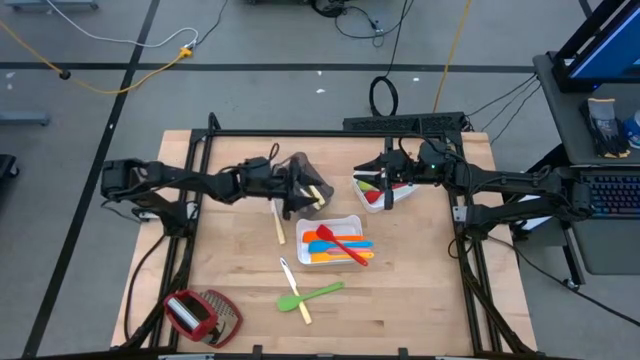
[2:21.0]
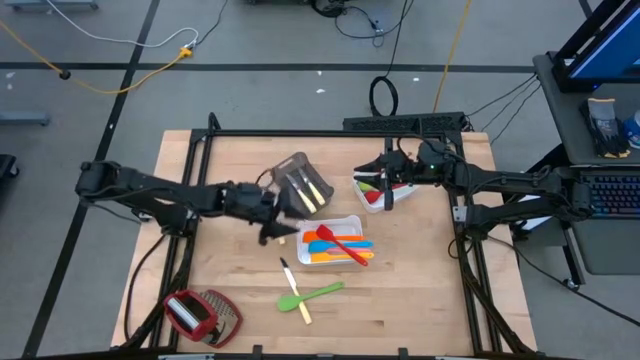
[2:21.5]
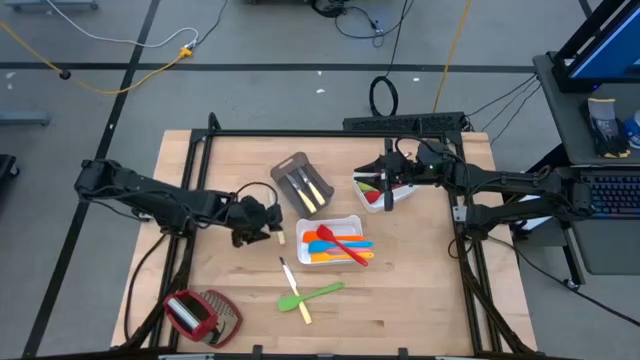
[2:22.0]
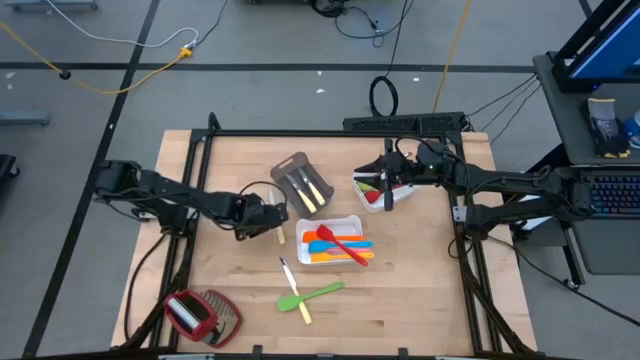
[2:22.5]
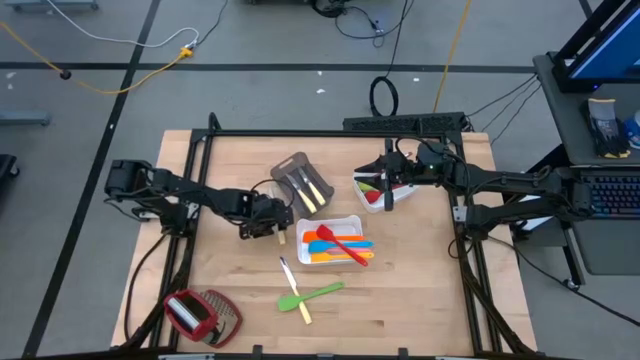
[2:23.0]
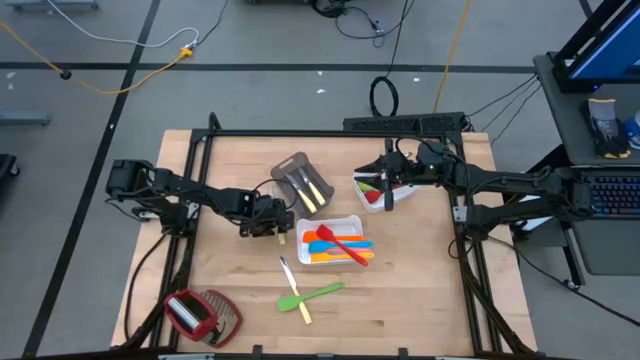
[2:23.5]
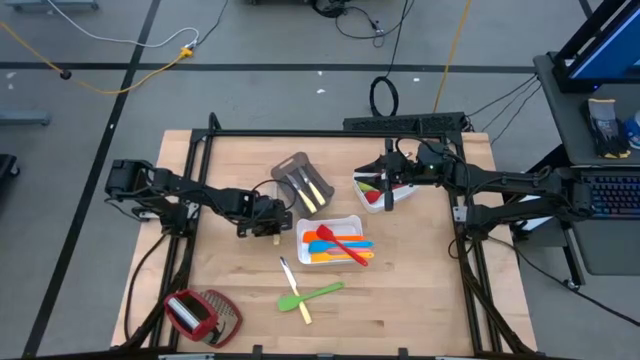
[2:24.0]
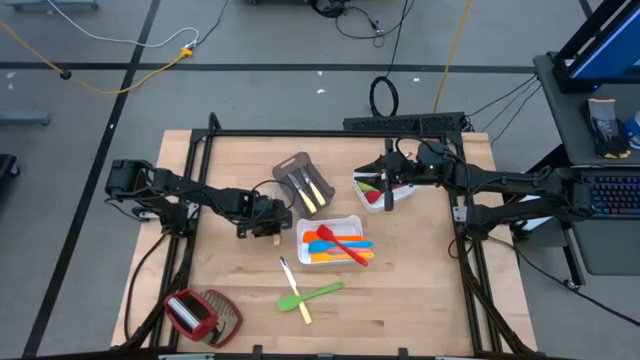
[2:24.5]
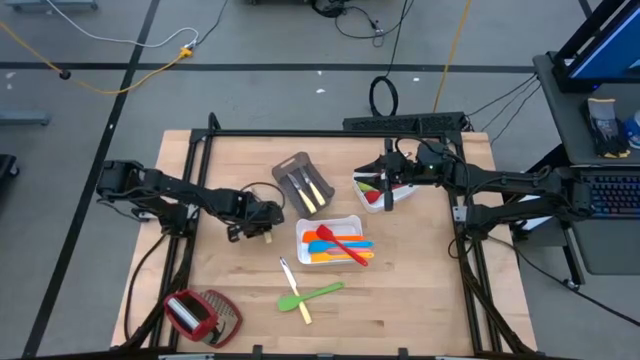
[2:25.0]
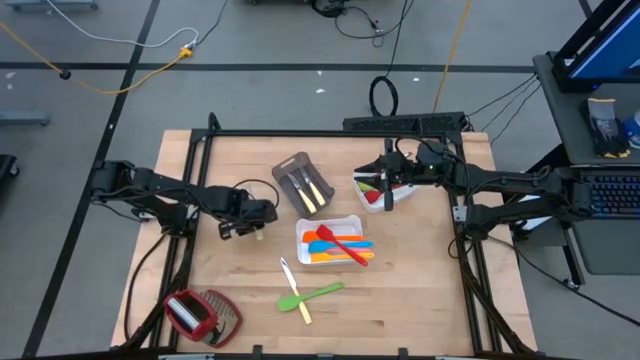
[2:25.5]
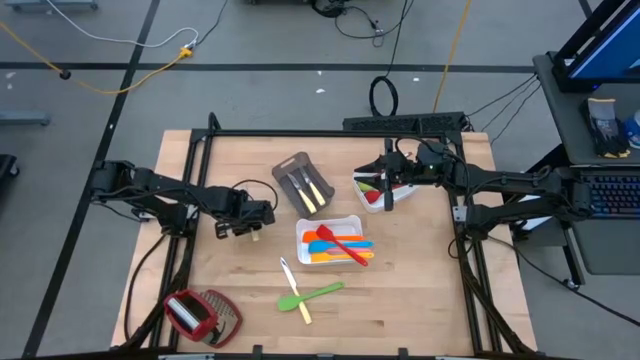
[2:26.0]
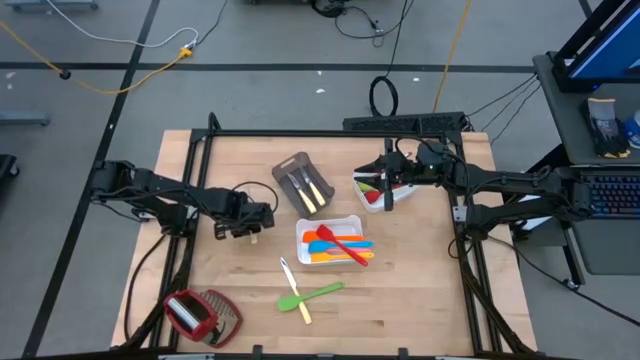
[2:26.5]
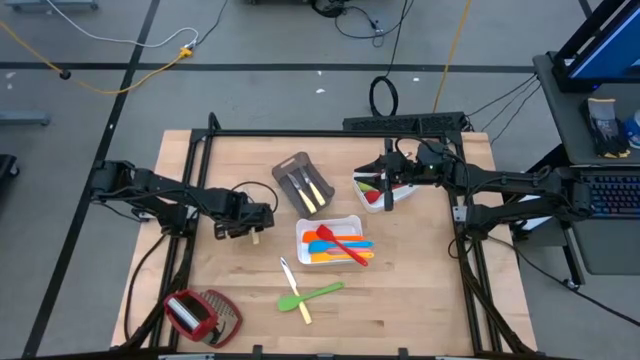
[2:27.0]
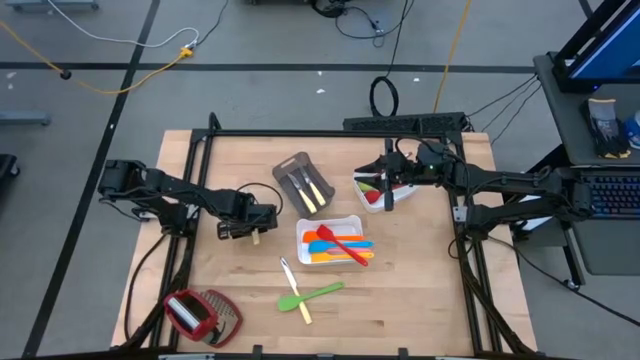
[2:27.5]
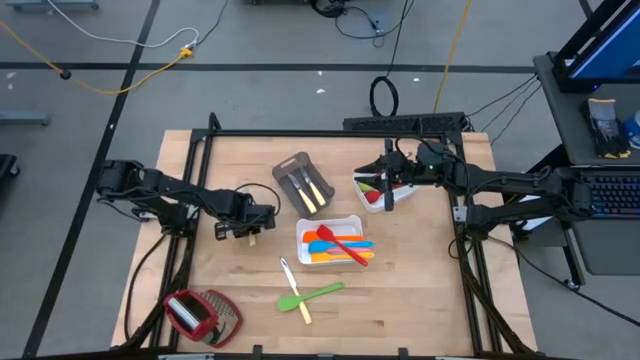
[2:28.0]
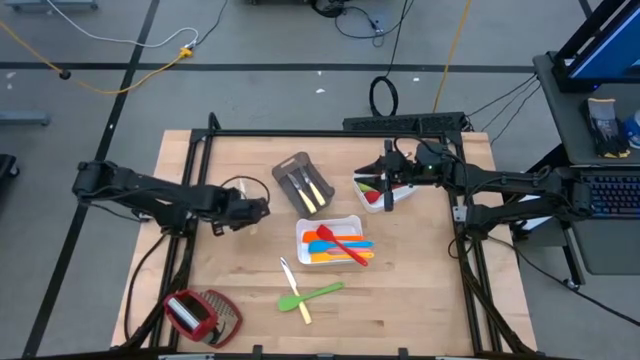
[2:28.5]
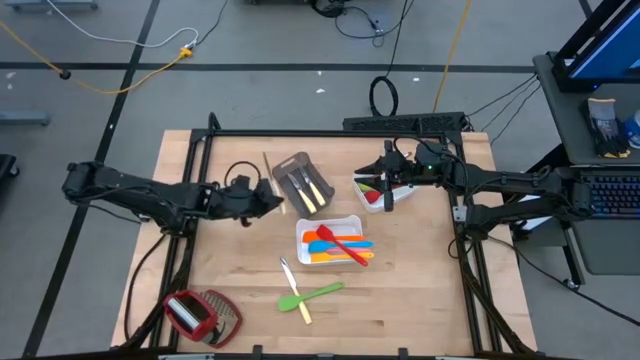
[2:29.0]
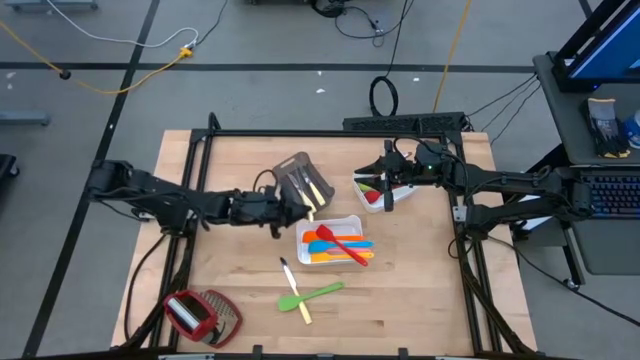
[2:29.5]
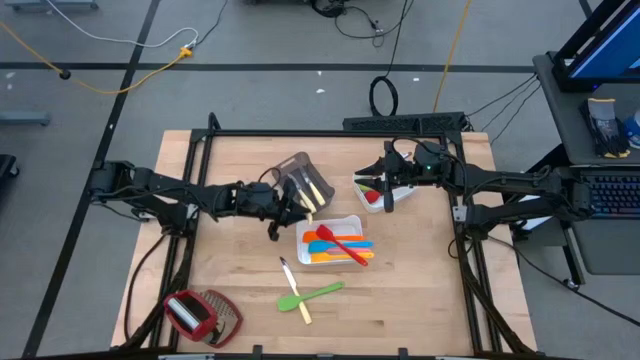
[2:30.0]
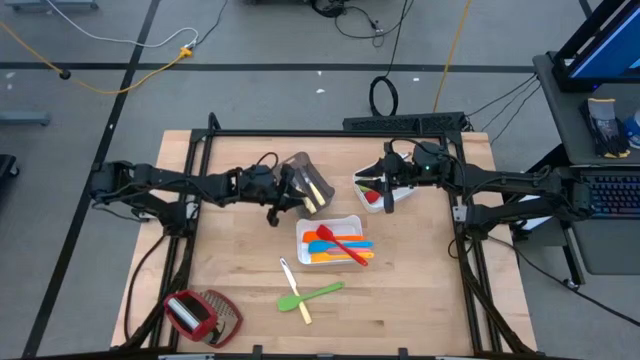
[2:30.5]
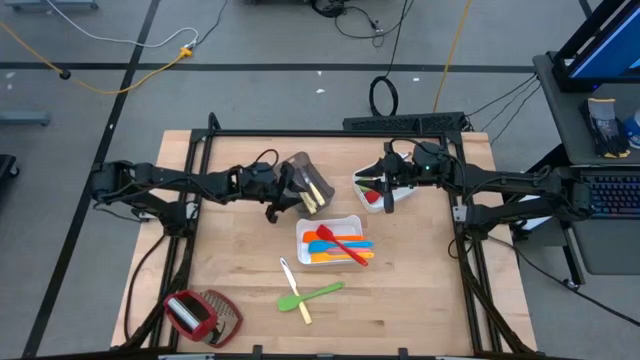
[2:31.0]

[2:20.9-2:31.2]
Task: Pick & Place Kitchen Items
Put the yellow knife into the black bin

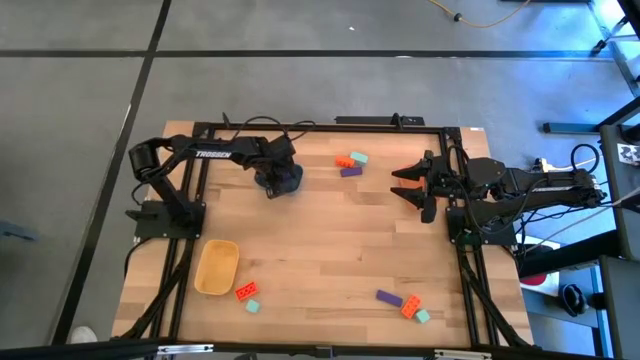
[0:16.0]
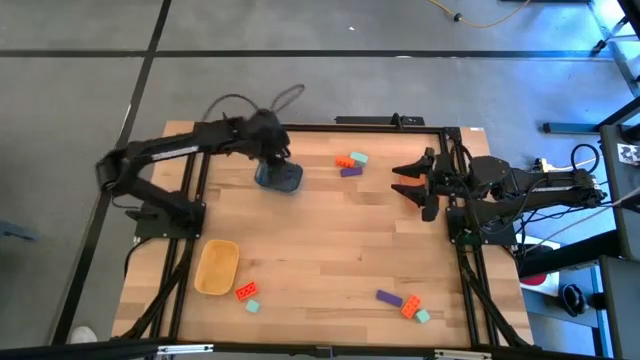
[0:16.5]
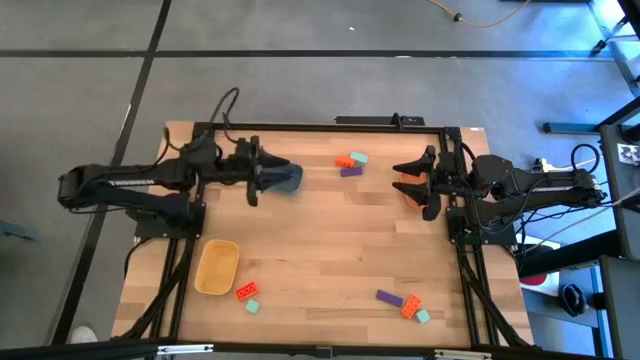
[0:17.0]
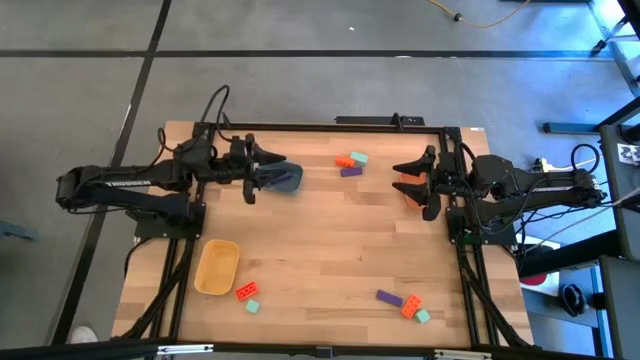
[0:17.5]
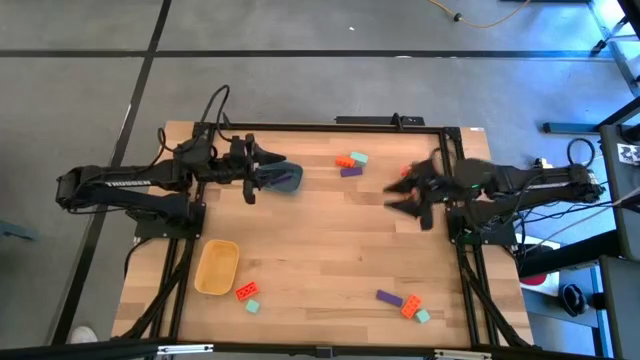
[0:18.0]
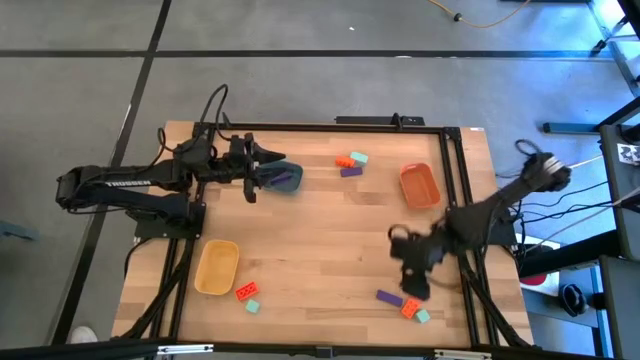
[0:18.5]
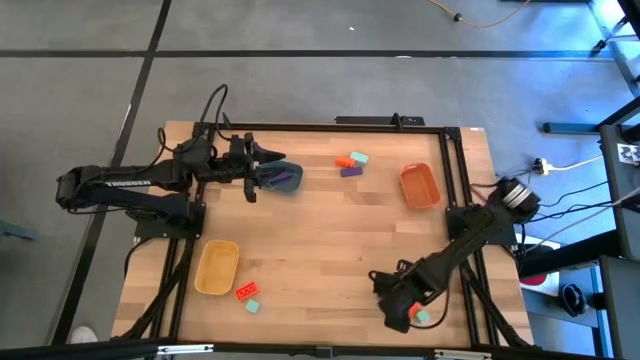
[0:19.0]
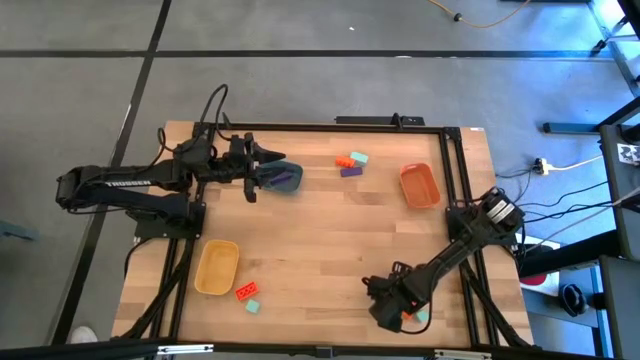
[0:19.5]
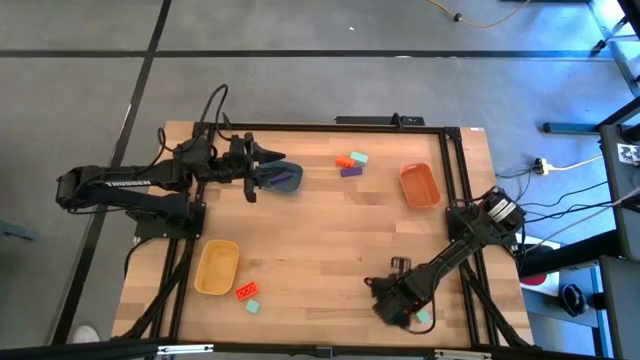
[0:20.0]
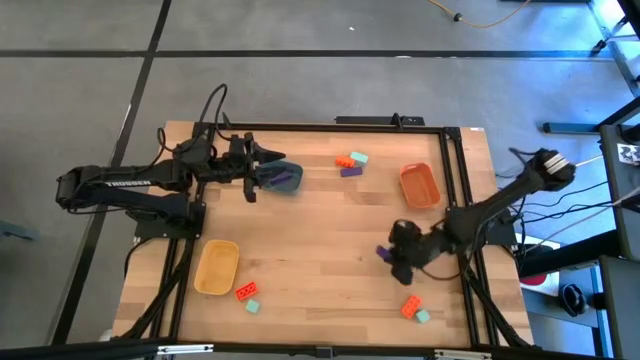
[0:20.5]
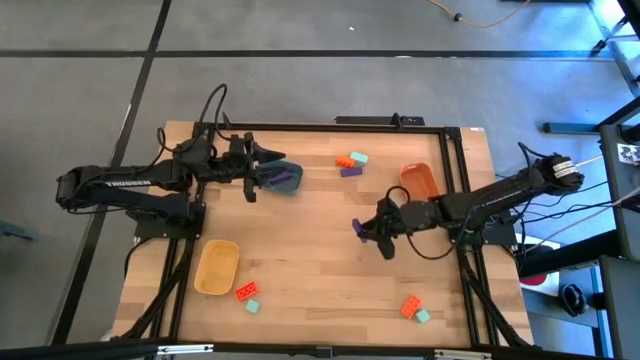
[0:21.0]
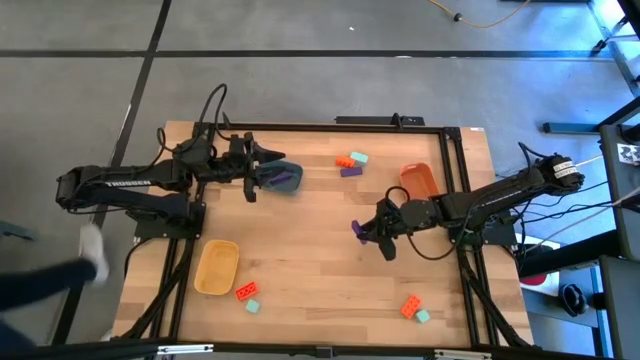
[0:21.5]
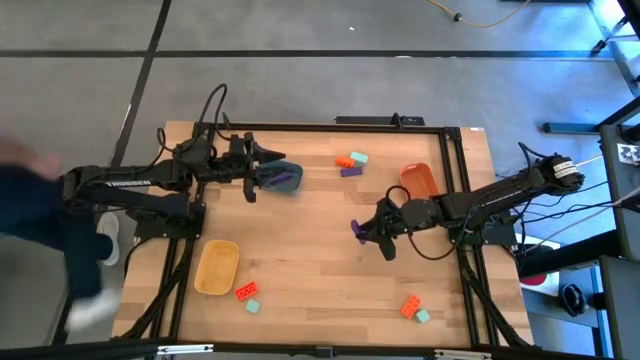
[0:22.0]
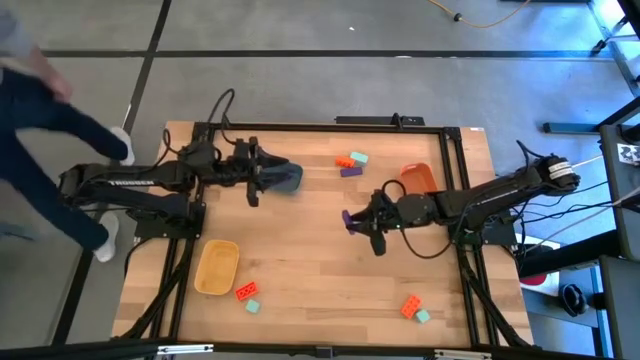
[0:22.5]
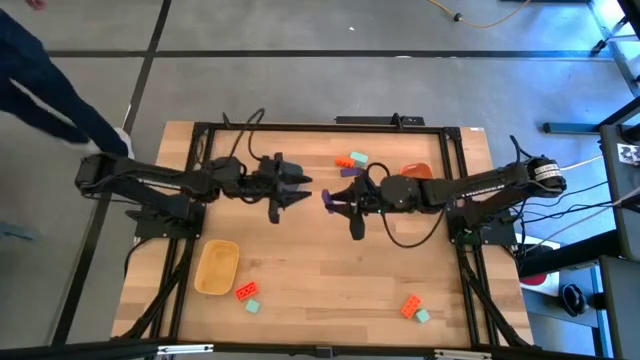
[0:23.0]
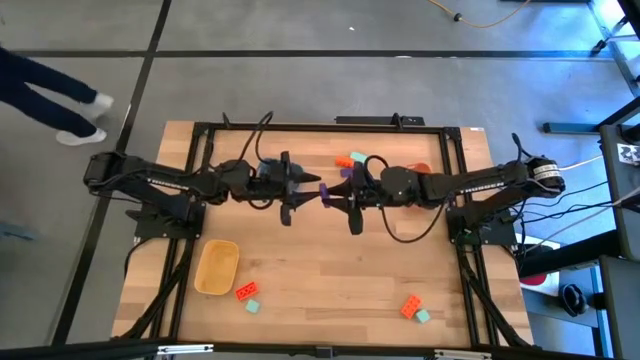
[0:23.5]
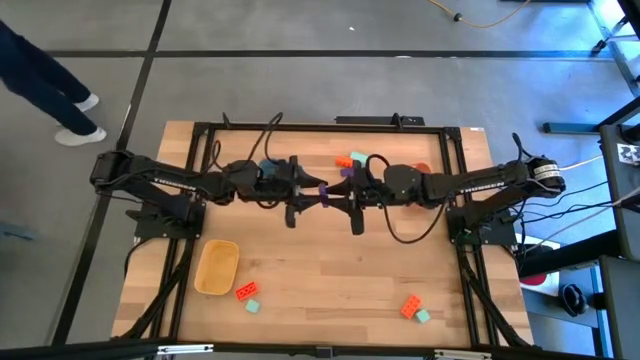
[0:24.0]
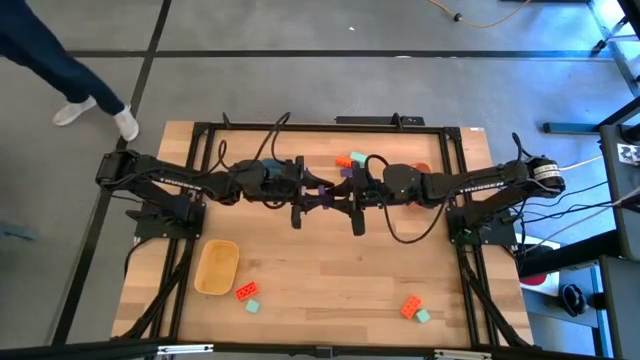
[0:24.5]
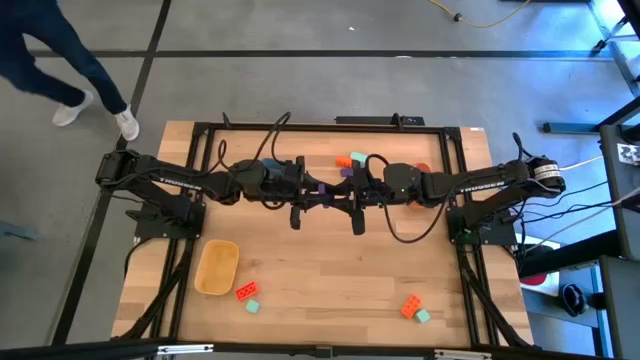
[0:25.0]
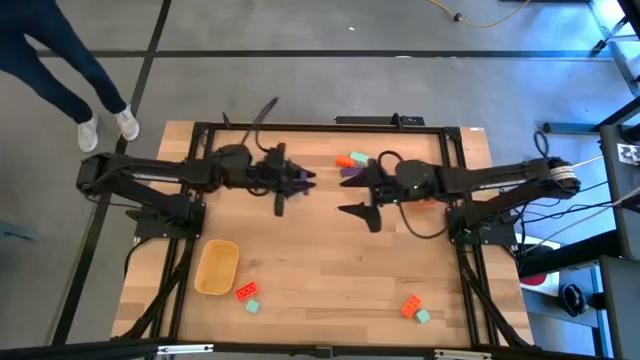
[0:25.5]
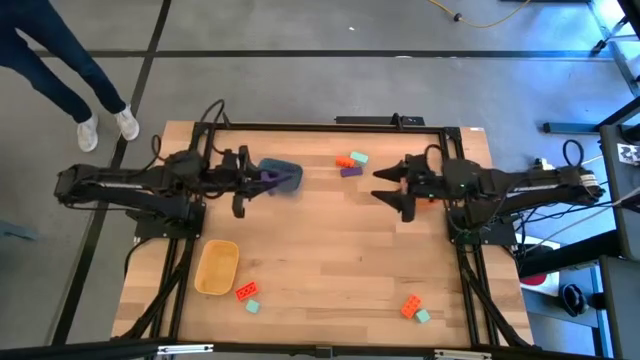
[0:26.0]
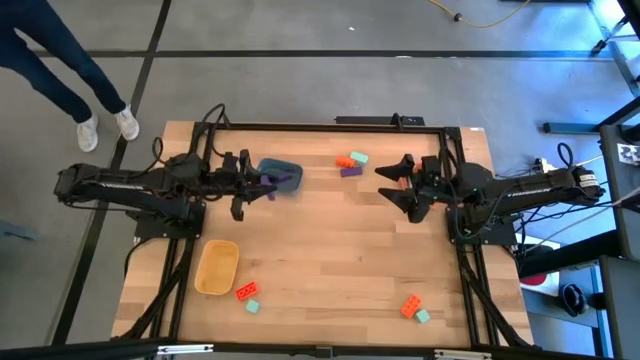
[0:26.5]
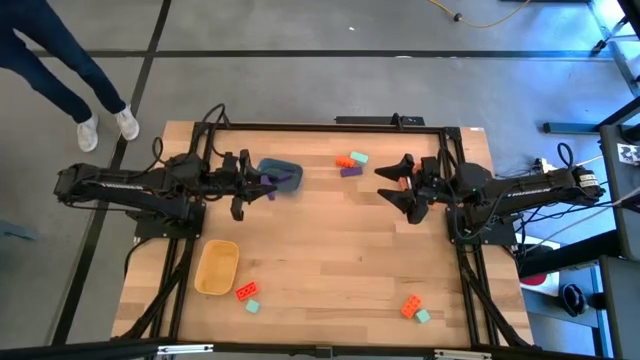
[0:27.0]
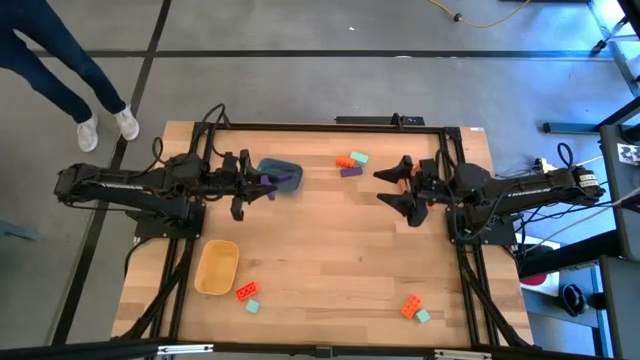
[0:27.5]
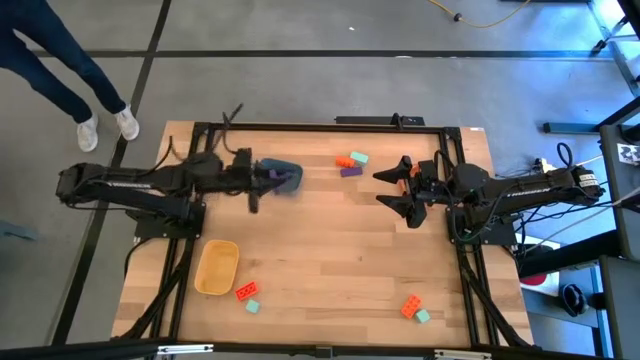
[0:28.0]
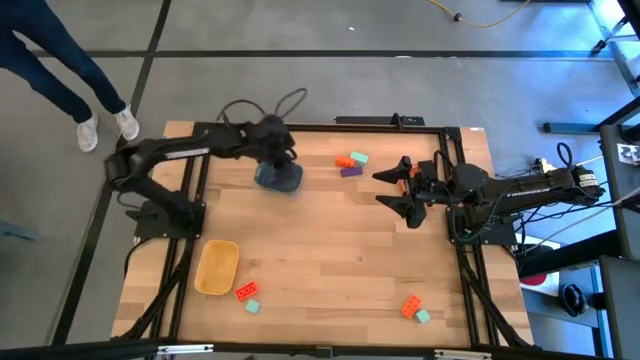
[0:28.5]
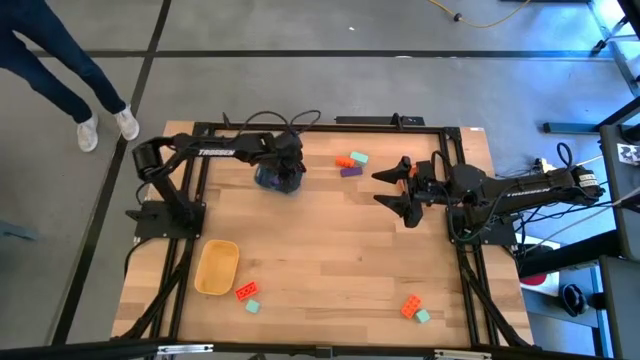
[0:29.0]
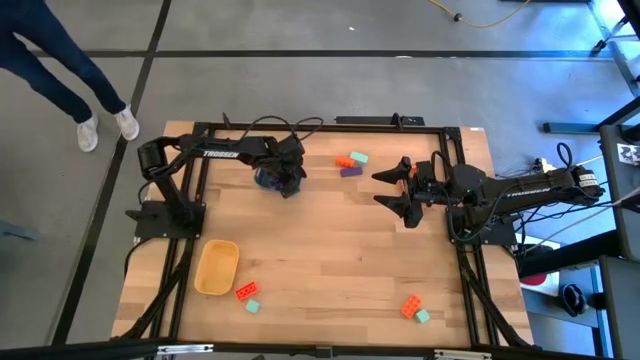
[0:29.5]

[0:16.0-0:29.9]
Task: Sort & place blocks by color
Put the bottom right violet rectangle block into the blue bin
